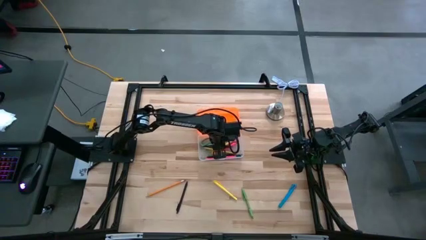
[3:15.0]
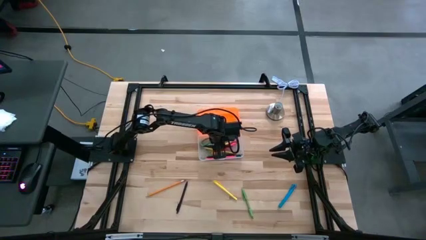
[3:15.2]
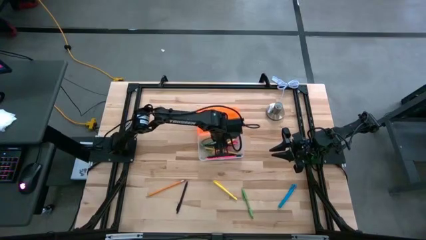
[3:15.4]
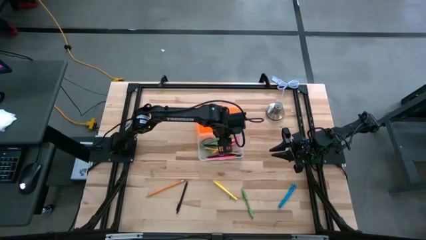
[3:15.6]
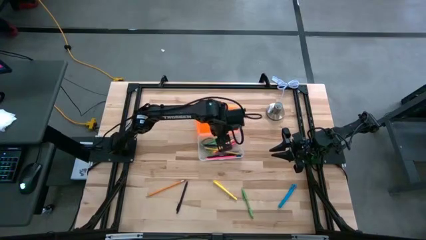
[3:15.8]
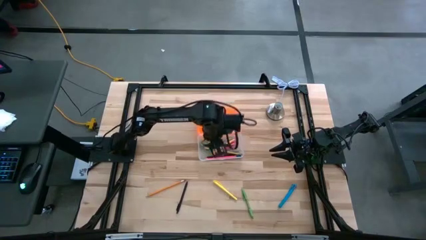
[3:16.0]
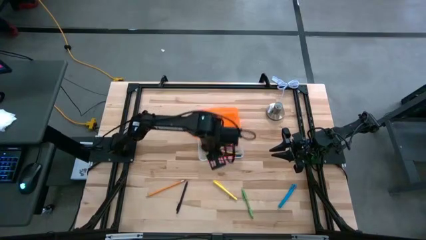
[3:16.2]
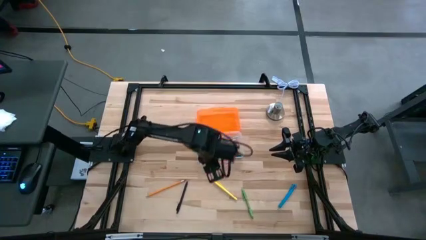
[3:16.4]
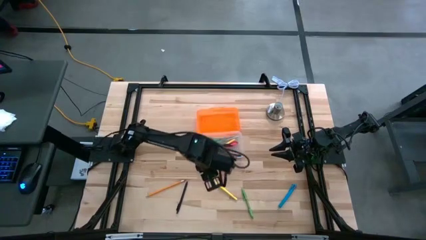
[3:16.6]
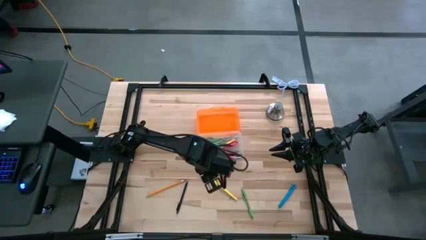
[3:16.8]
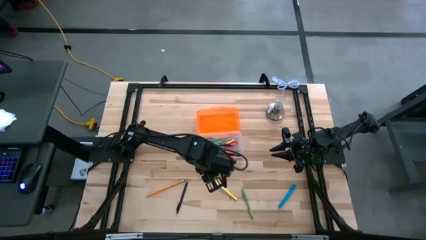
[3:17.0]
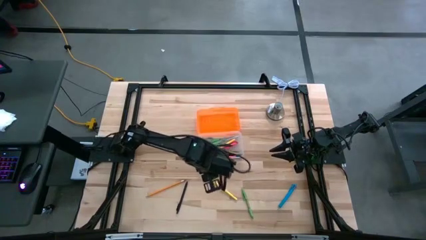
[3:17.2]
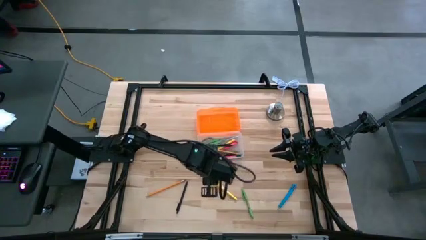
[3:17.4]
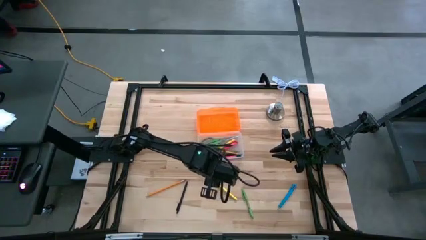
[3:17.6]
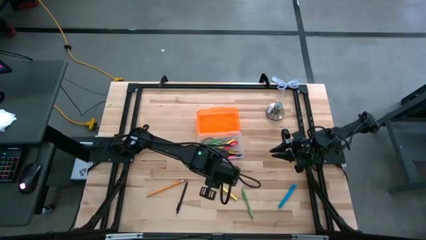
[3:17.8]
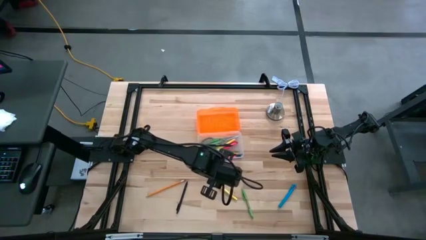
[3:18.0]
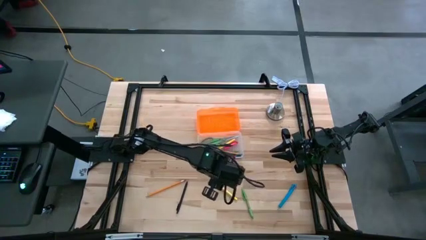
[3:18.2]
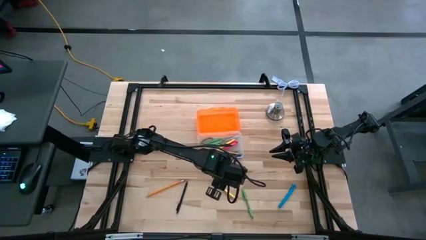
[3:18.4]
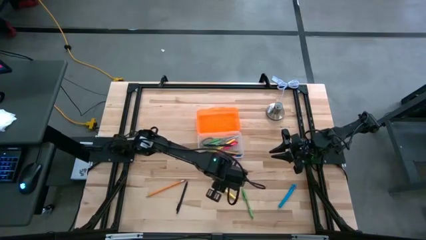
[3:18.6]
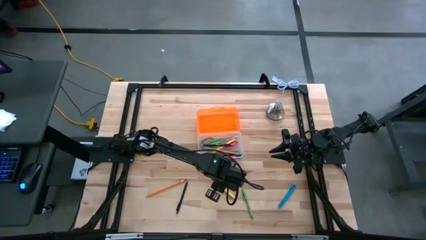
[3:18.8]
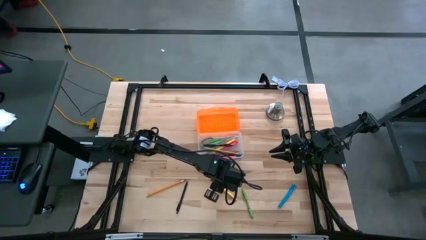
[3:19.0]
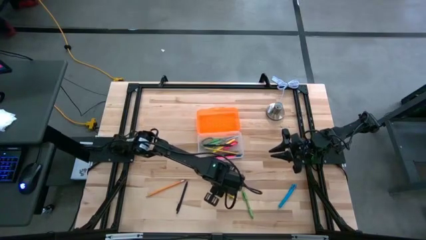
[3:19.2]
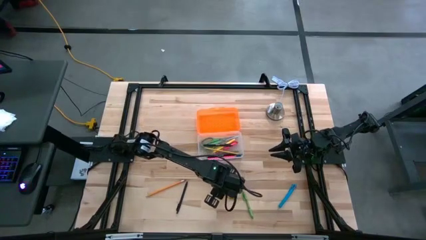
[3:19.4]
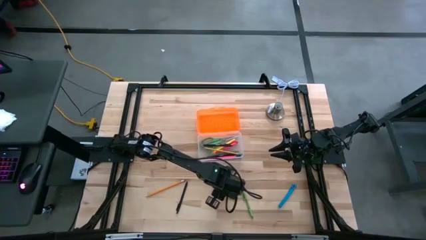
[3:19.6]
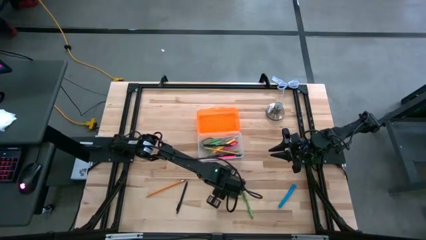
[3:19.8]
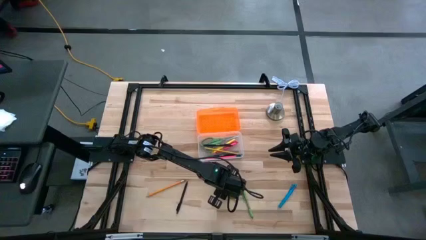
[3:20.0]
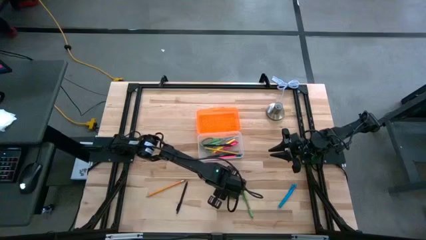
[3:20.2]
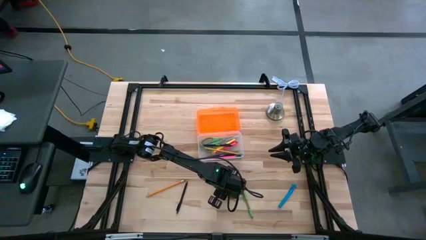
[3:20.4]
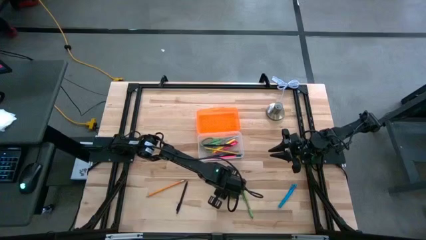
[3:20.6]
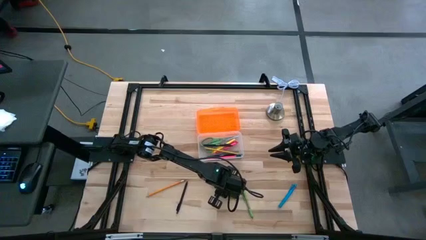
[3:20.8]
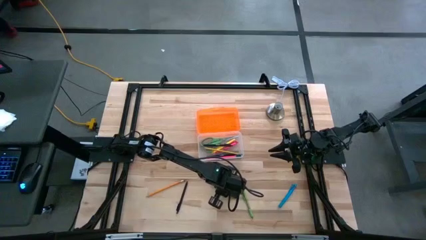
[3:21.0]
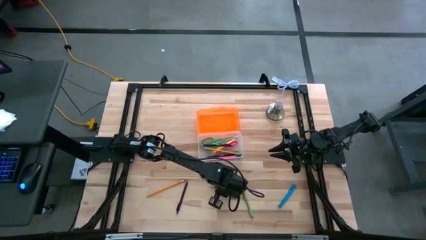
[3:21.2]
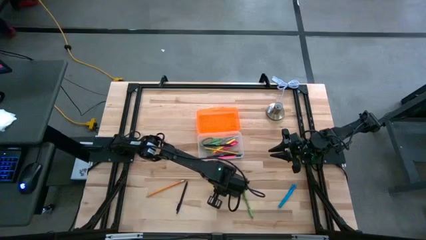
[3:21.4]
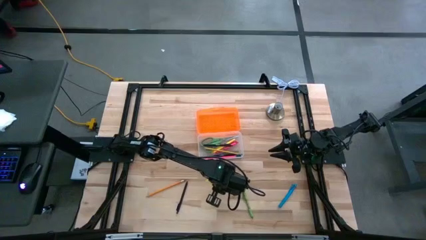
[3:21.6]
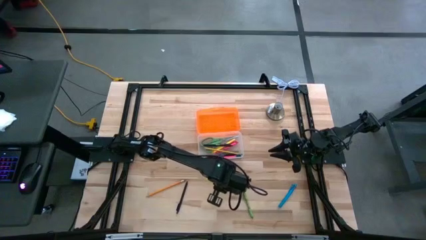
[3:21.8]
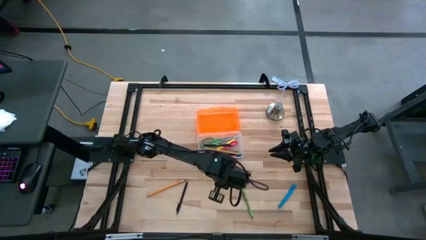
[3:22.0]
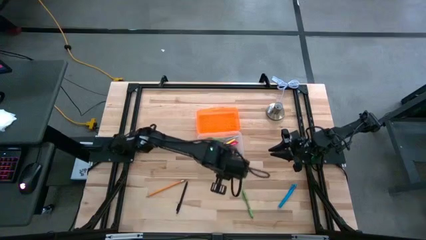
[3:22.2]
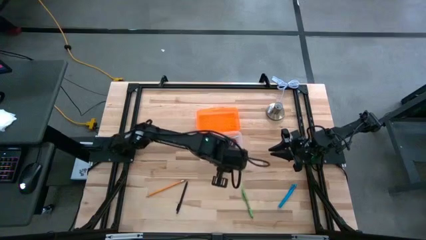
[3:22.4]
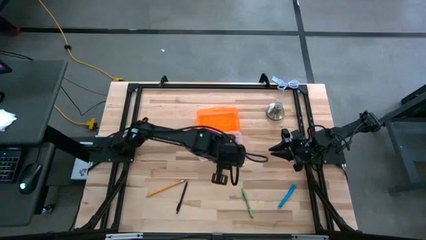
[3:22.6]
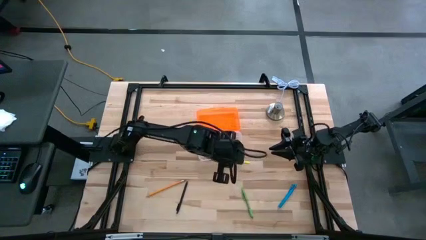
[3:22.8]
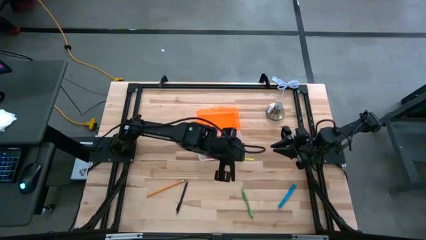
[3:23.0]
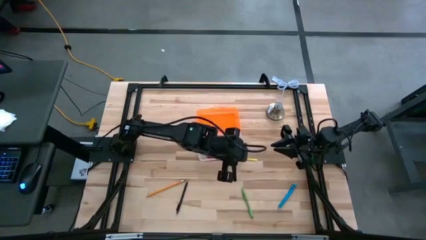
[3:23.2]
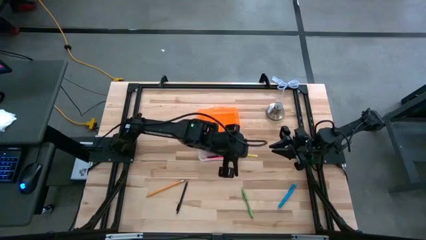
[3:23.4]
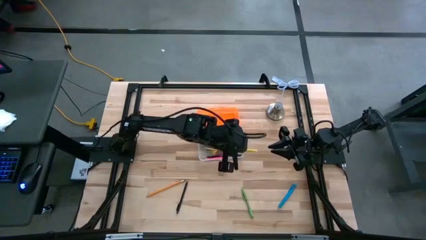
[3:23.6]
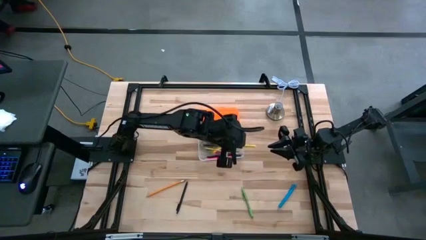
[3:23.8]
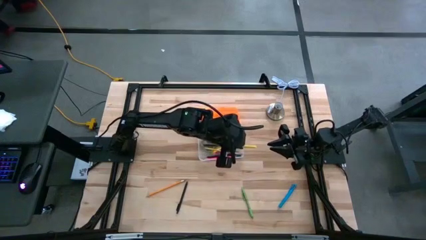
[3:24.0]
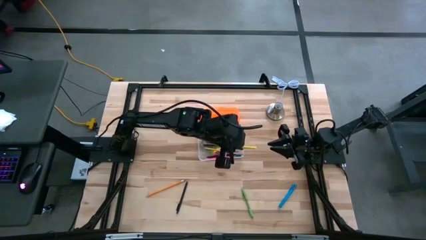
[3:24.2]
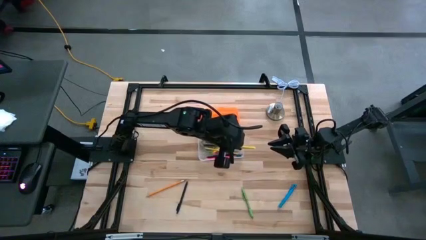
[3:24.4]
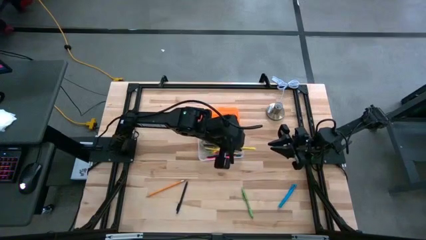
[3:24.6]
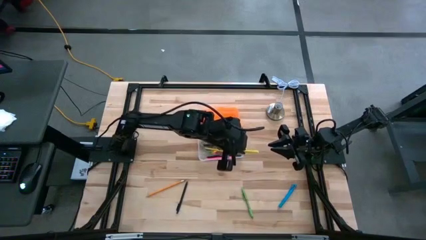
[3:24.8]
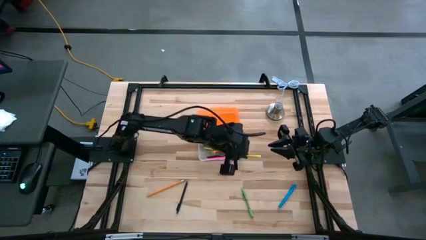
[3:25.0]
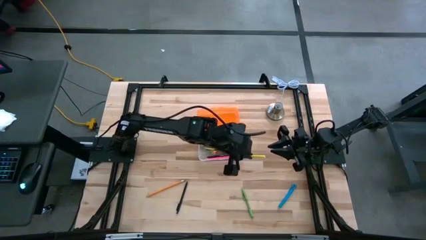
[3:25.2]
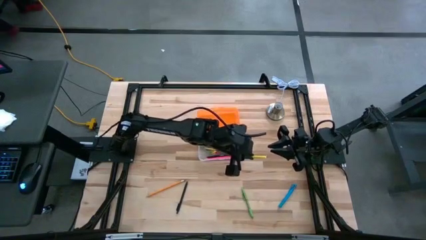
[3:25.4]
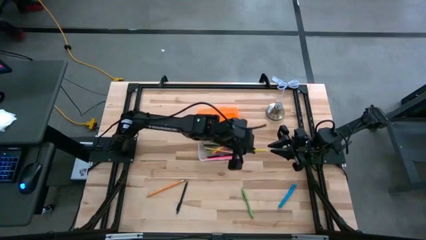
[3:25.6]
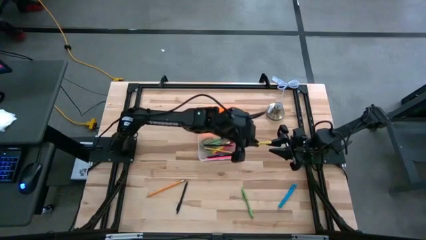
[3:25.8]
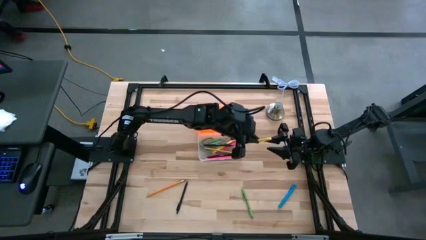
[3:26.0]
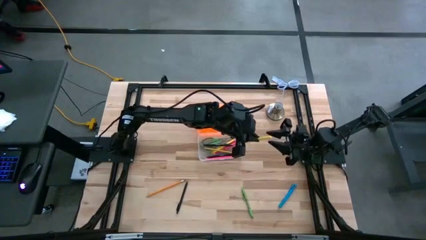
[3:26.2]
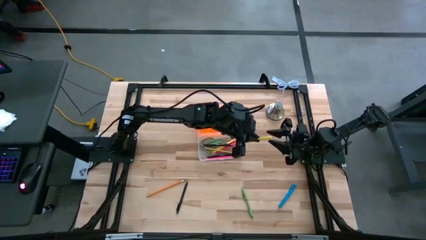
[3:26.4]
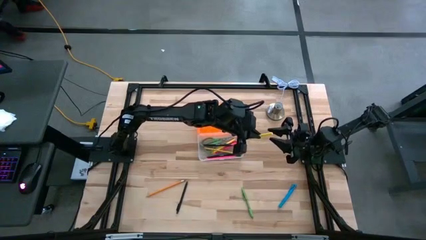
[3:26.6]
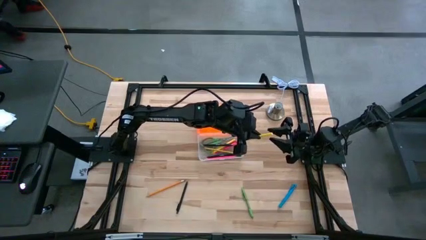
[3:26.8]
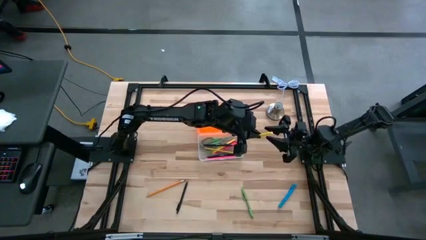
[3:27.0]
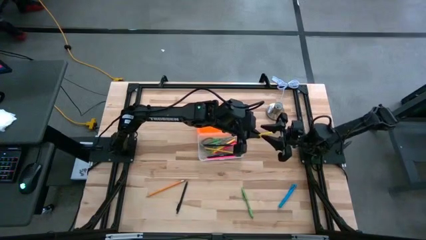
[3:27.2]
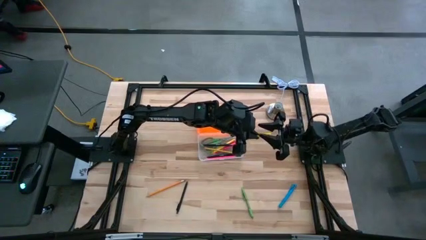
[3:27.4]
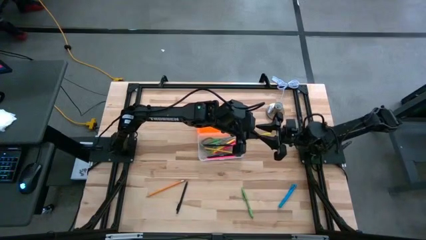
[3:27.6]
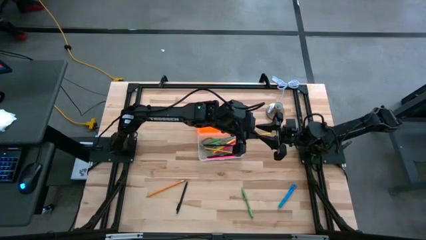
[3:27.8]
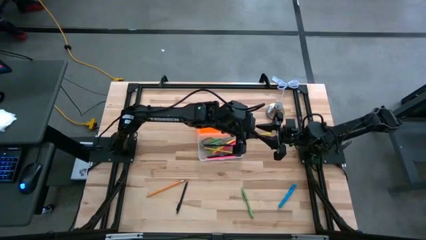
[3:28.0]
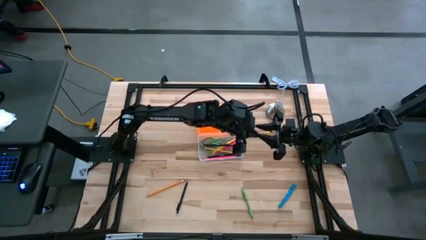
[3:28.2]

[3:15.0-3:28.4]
Task: Pick & place school supplies into a supply box
Put the yellow pen into the container

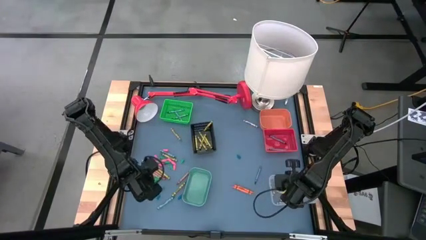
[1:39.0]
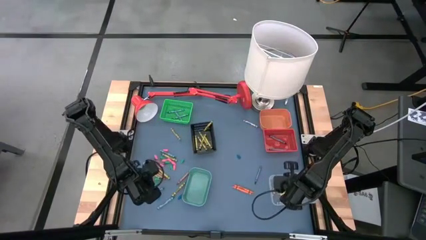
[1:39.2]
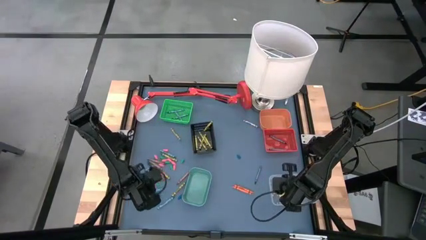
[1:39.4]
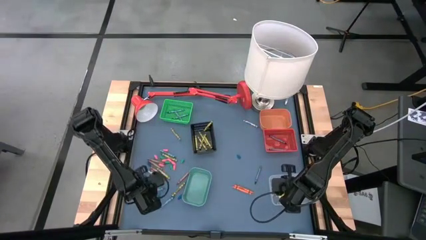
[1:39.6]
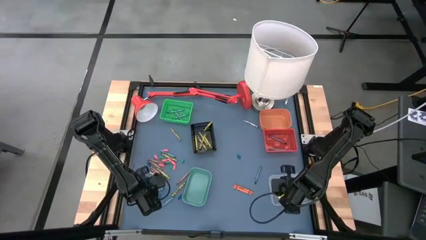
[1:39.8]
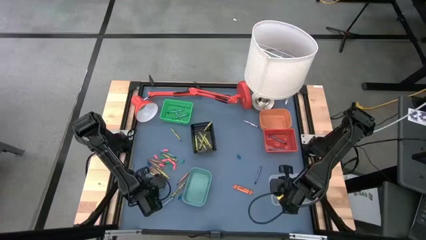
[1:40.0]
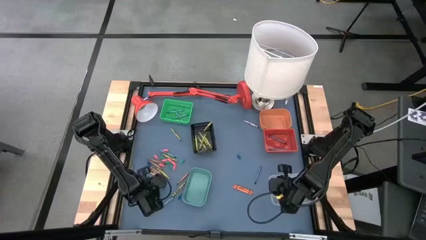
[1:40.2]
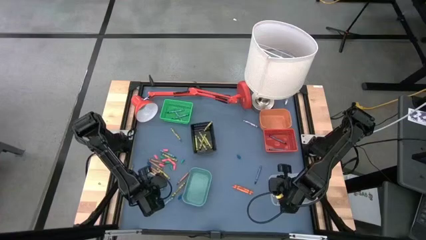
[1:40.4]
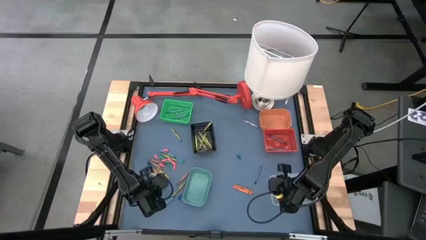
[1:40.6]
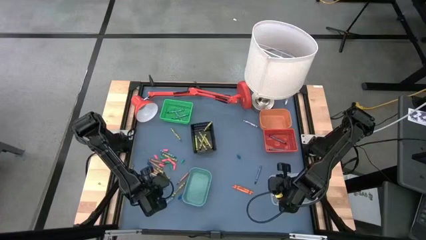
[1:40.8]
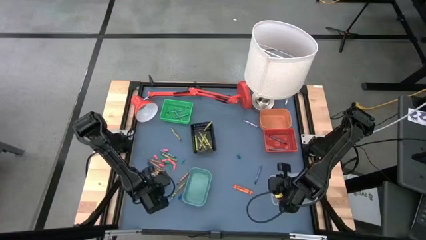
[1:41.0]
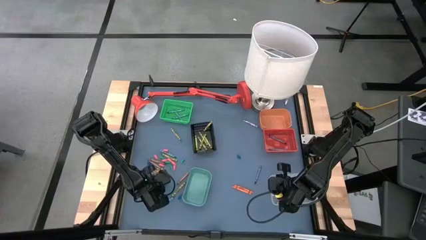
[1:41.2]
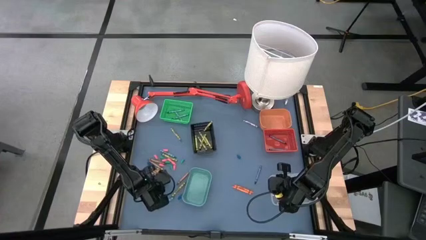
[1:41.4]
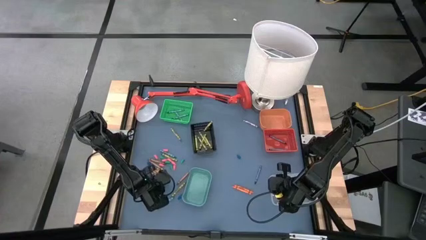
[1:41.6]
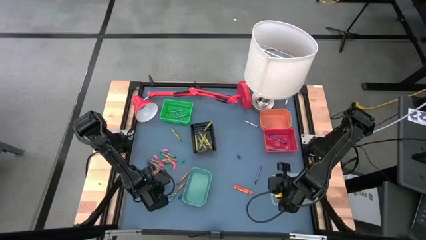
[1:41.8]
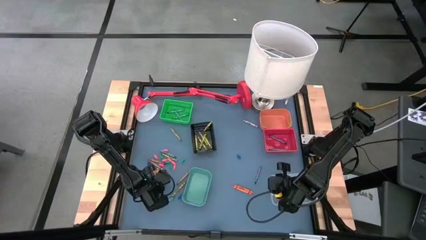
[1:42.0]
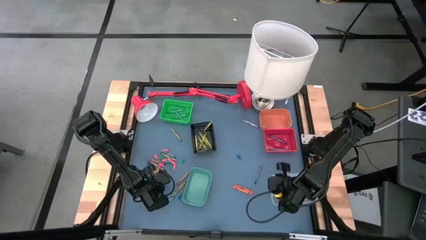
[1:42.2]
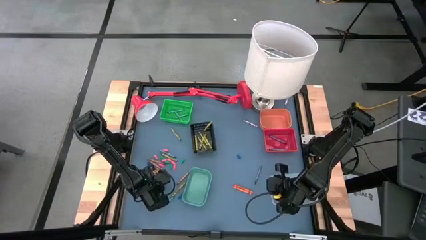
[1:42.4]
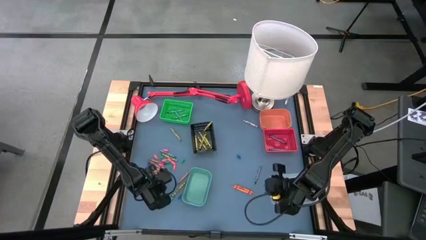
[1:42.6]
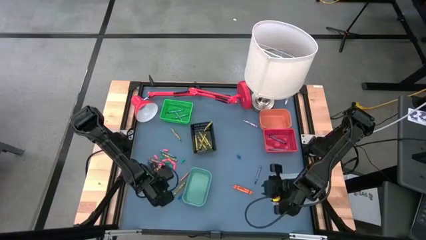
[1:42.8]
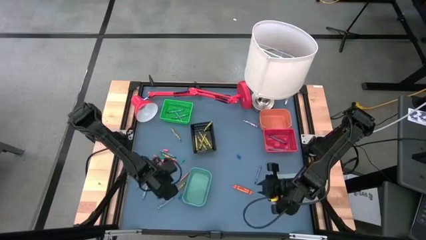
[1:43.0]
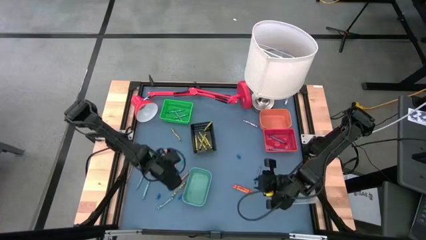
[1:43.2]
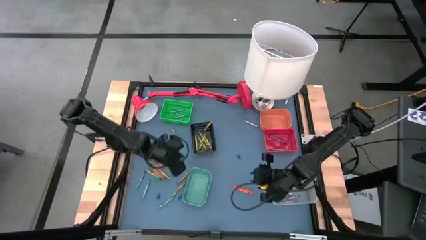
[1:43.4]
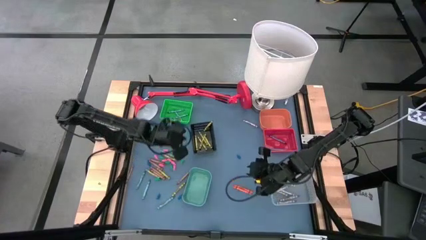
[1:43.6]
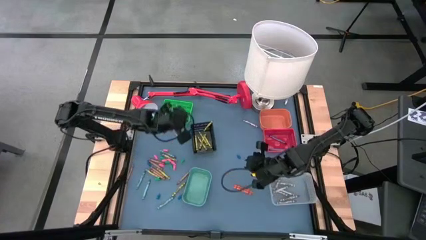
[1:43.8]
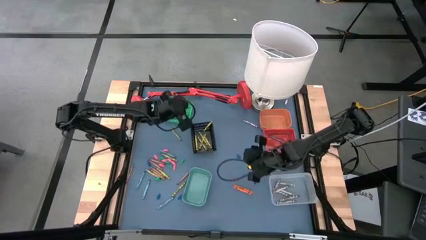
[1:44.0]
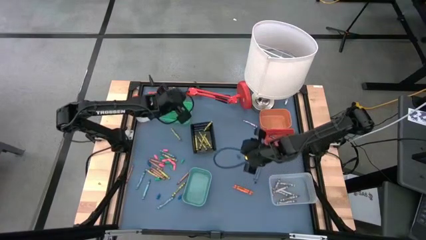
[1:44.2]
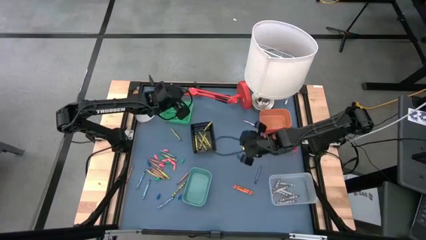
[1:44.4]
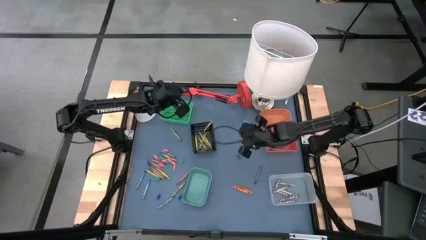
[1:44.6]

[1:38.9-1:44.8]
Task: Sort crayons
Put the blue green crayon into the green bin
